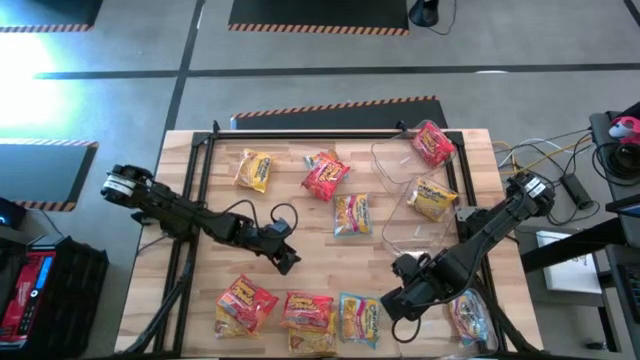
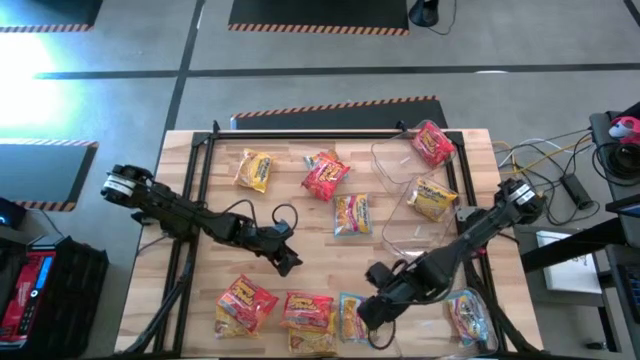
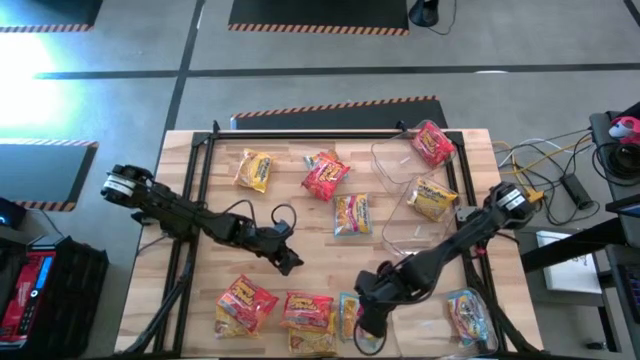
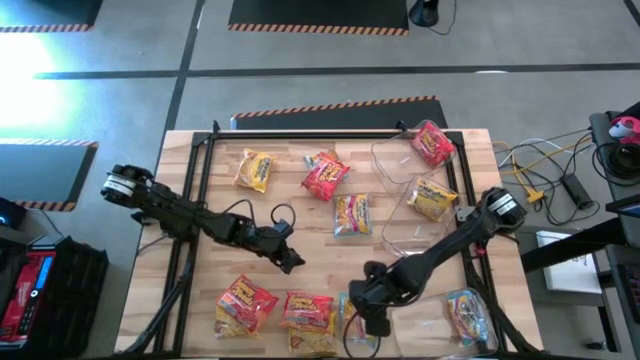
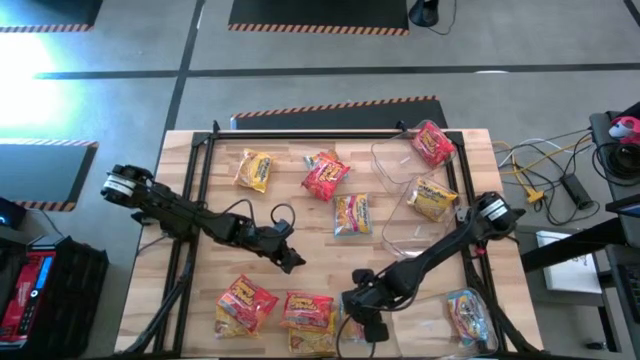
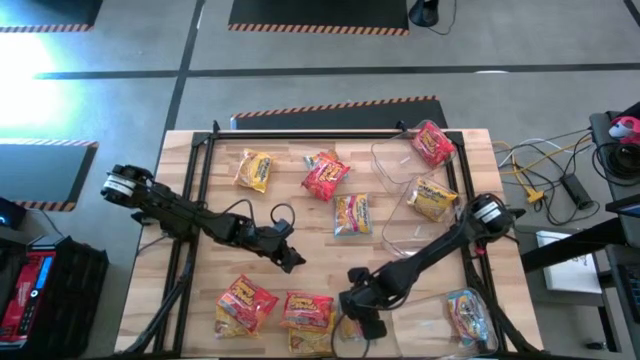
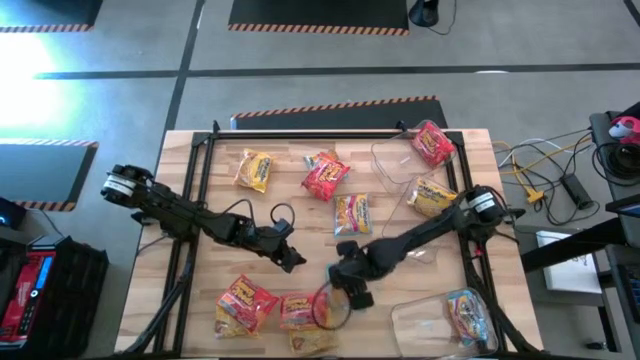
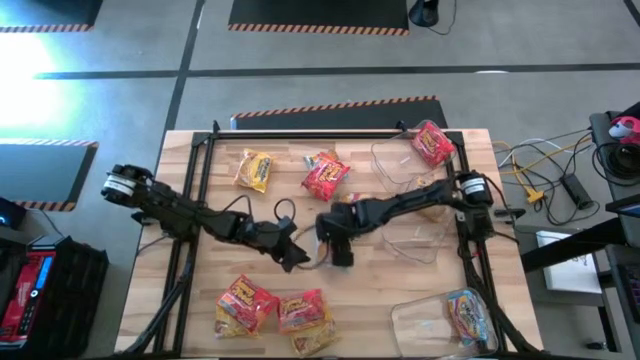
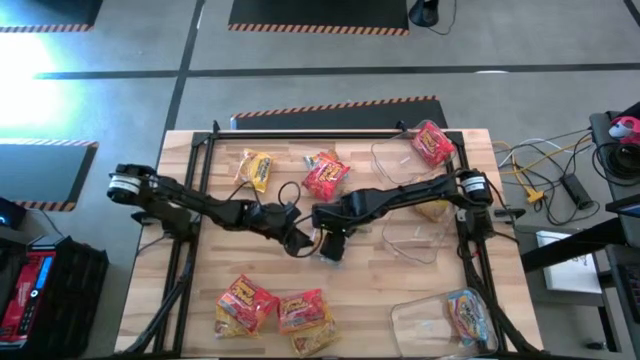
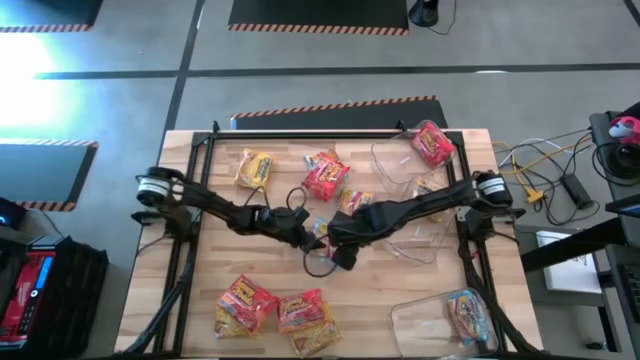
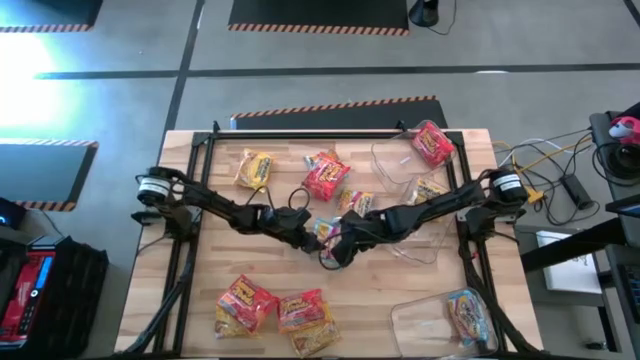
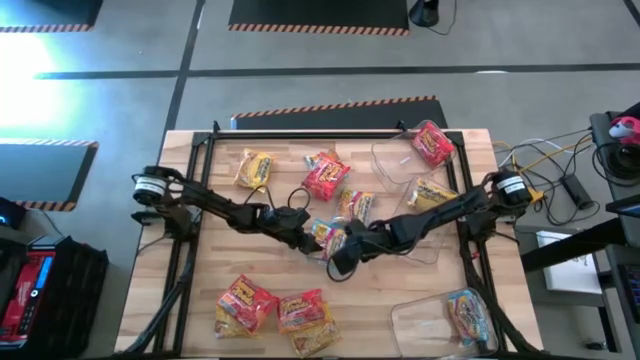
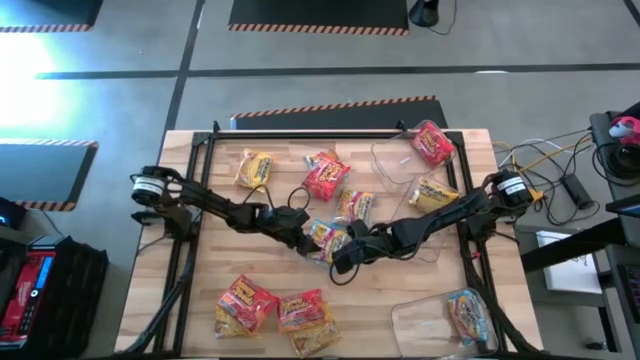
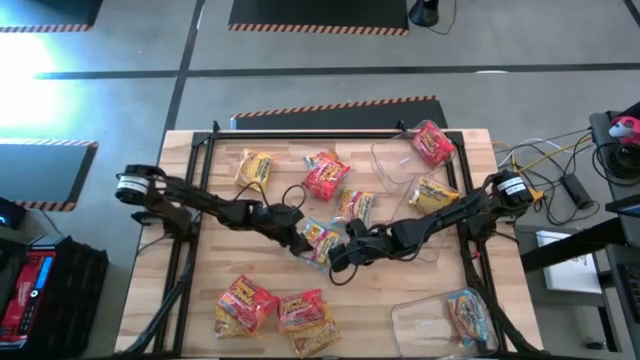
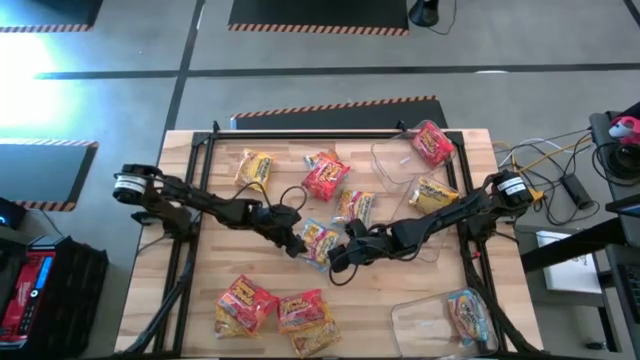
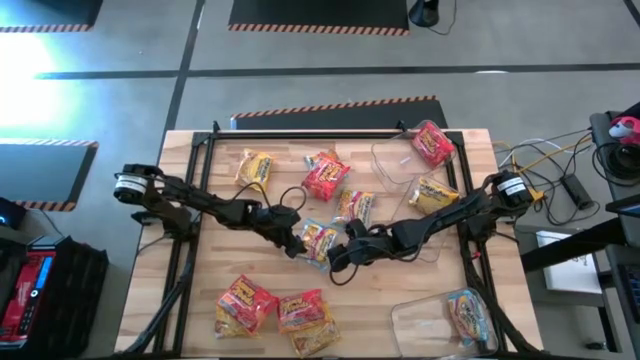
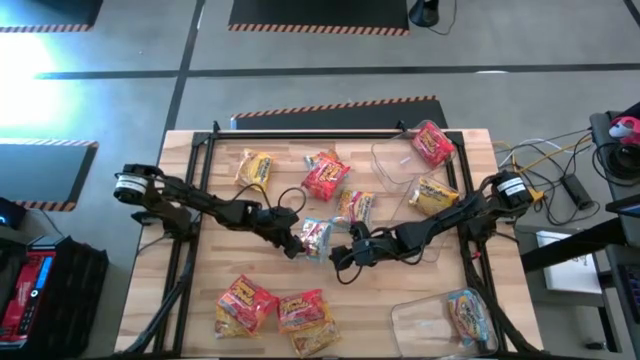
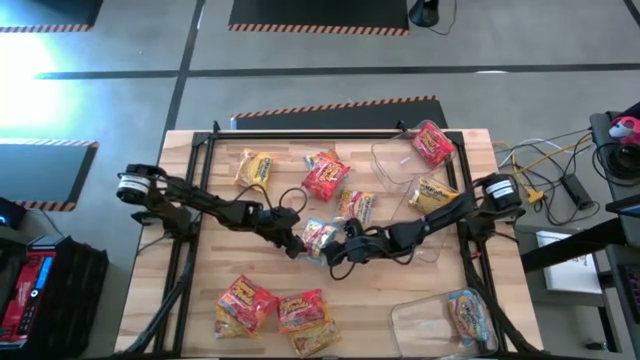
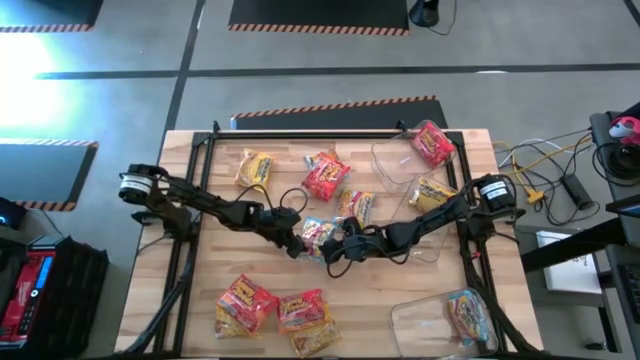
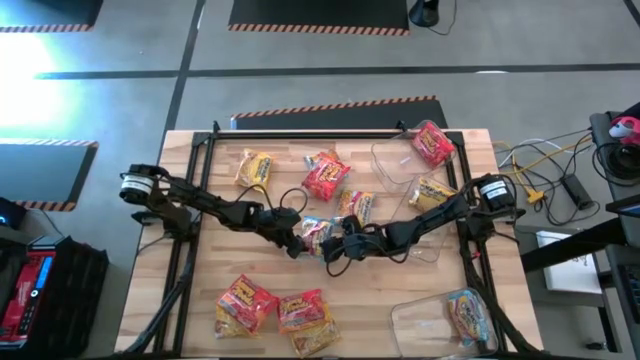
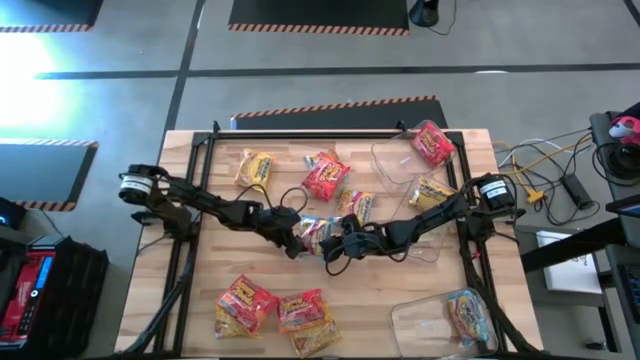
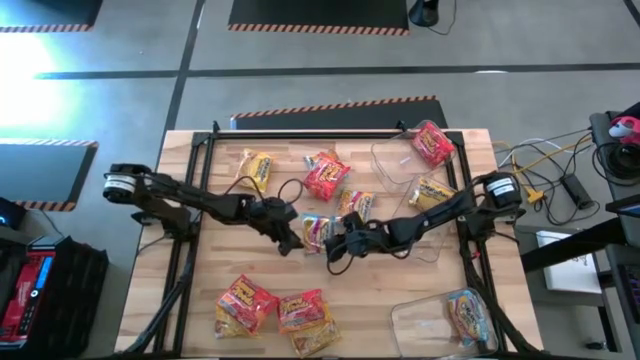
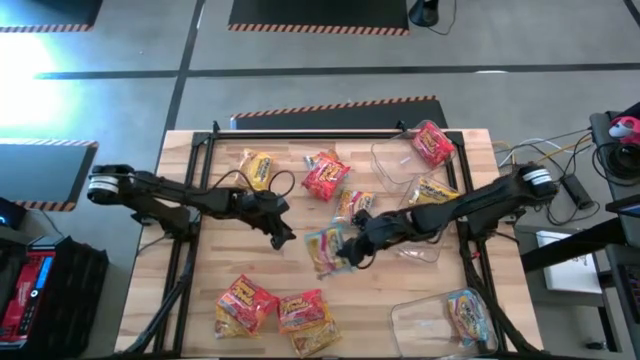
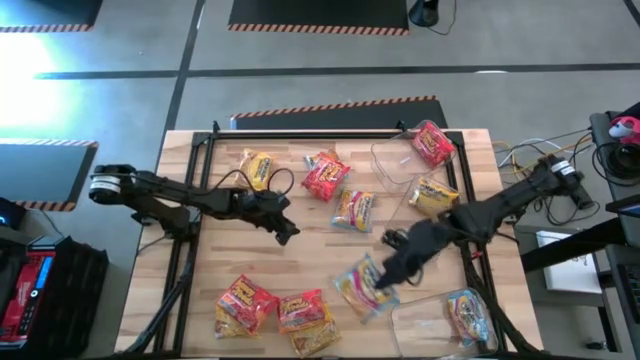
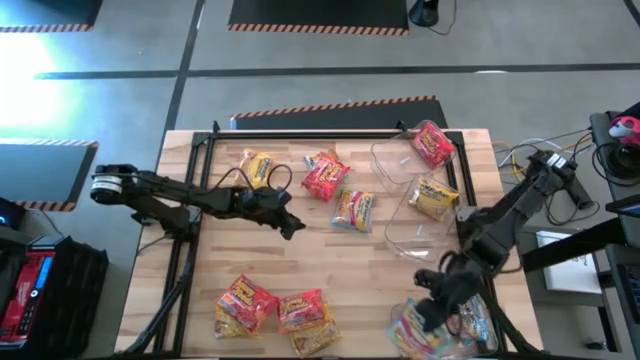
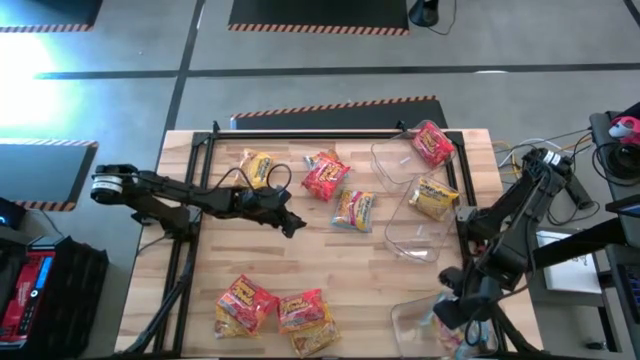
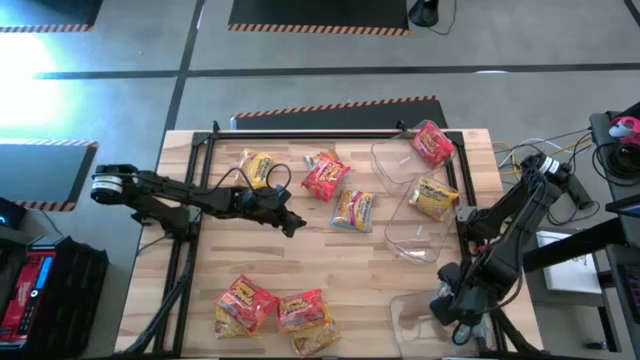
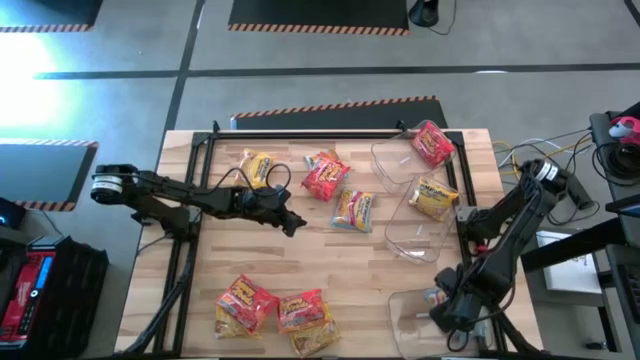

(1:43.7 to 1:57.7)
Task: Sort Maruchan noodles
Put the blue noodle pack into the bottom transparent bin

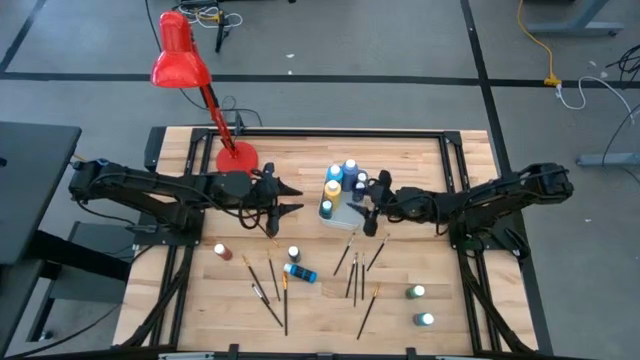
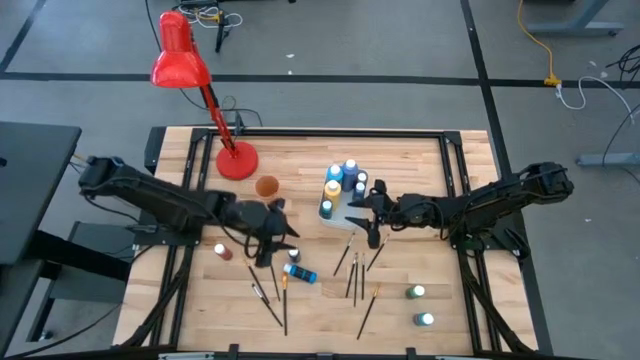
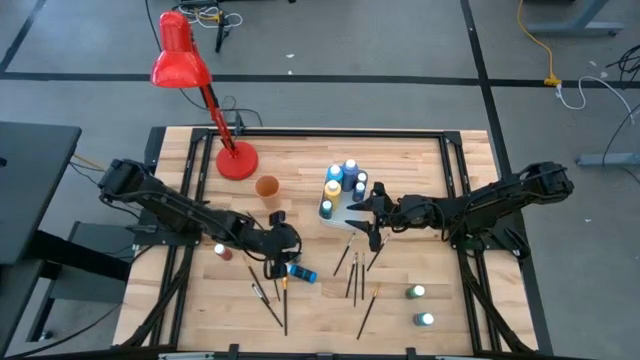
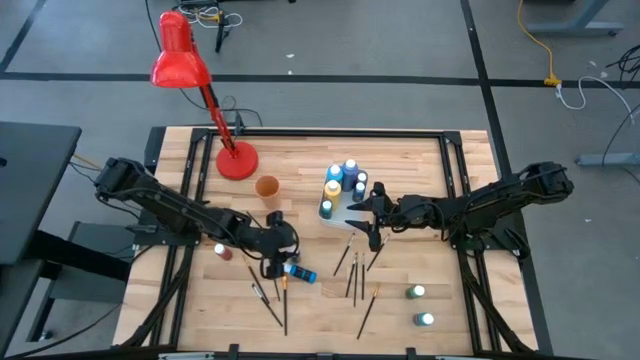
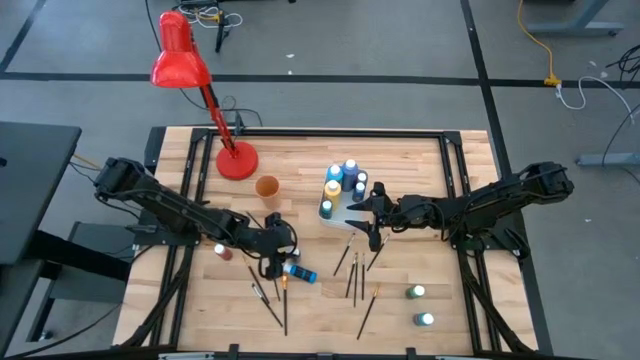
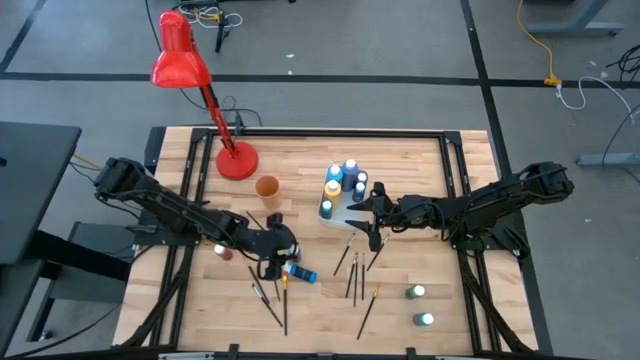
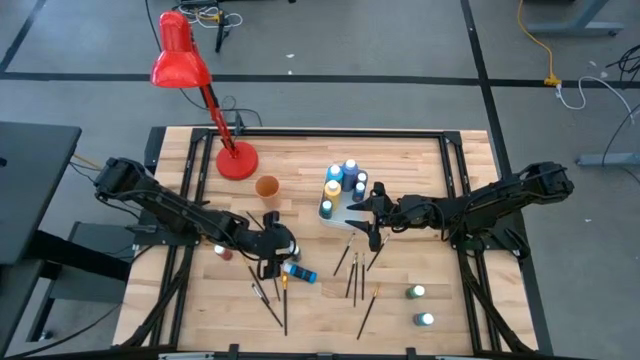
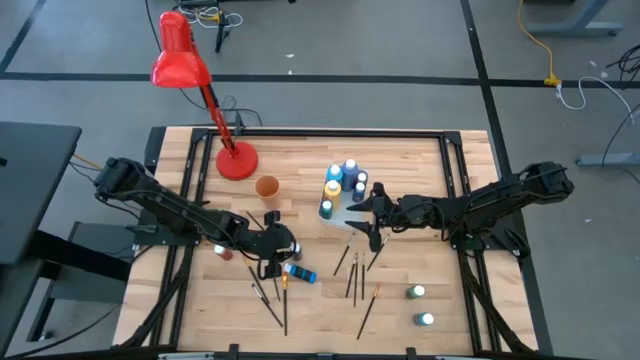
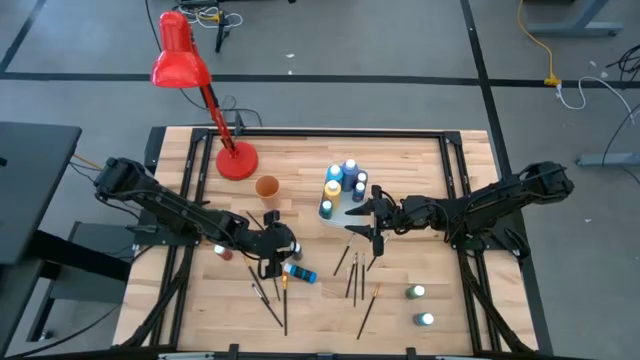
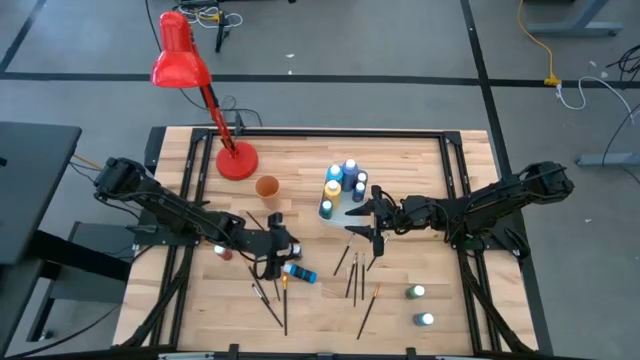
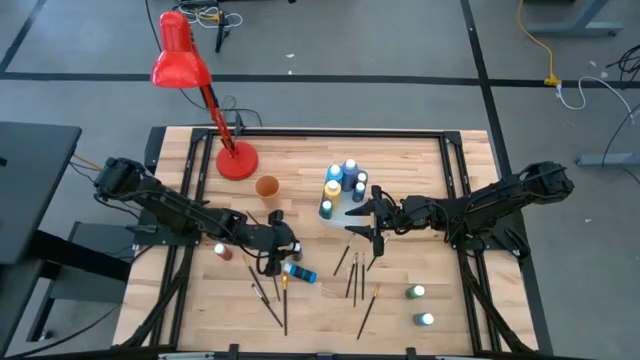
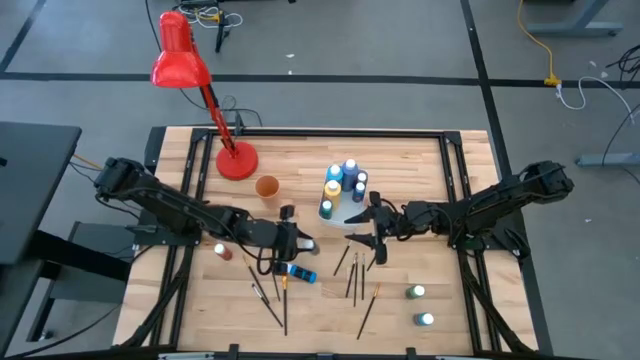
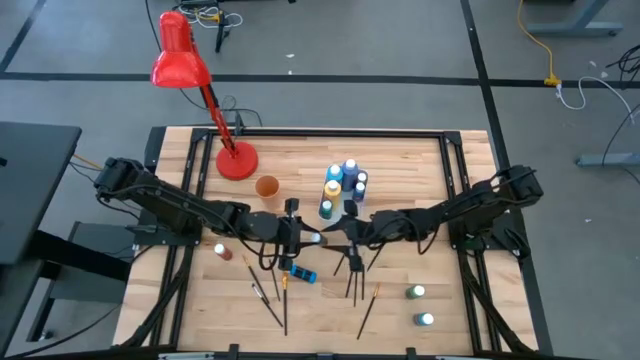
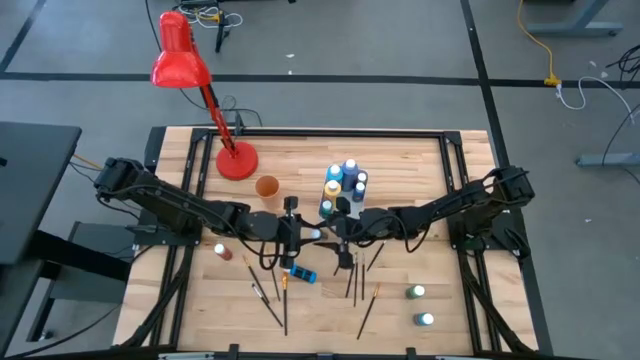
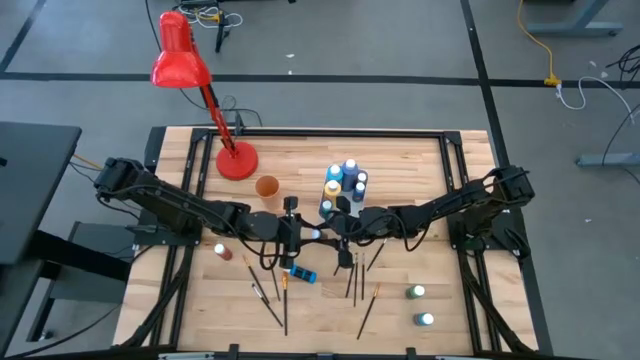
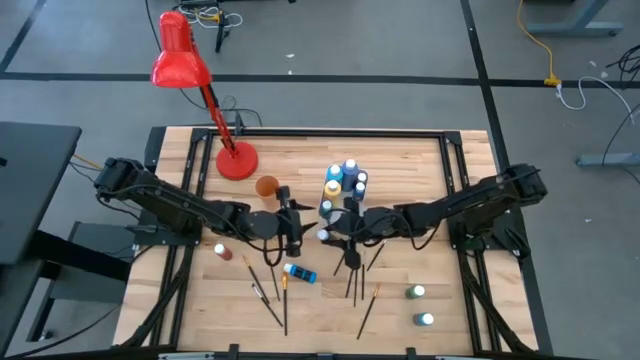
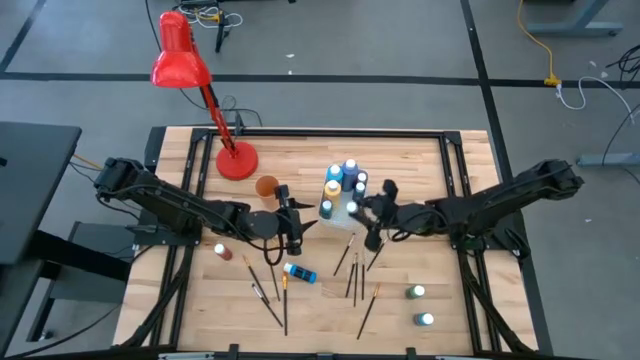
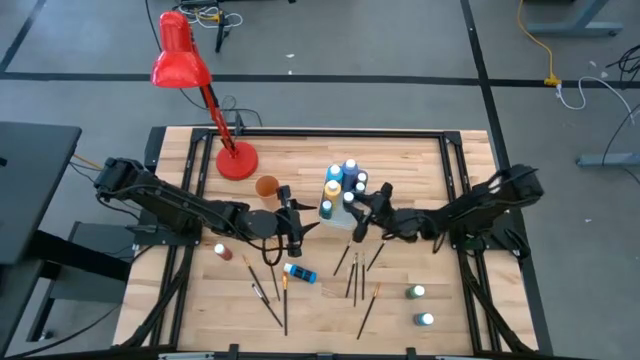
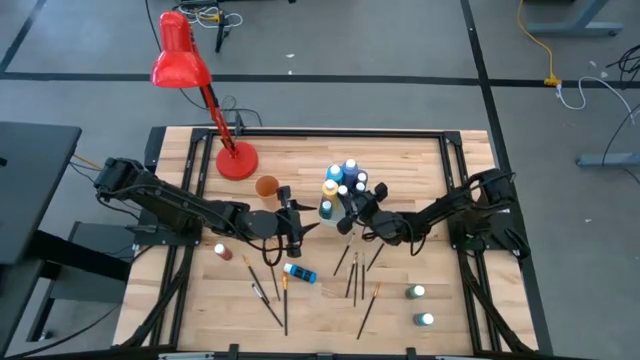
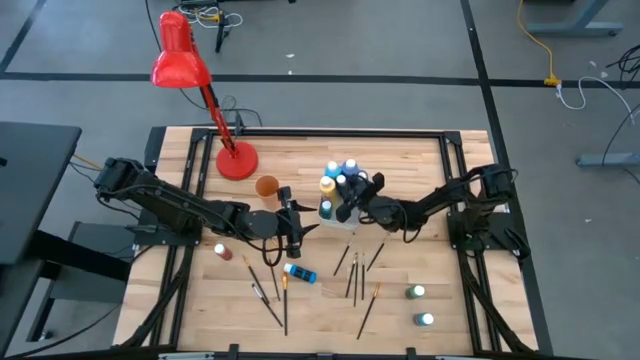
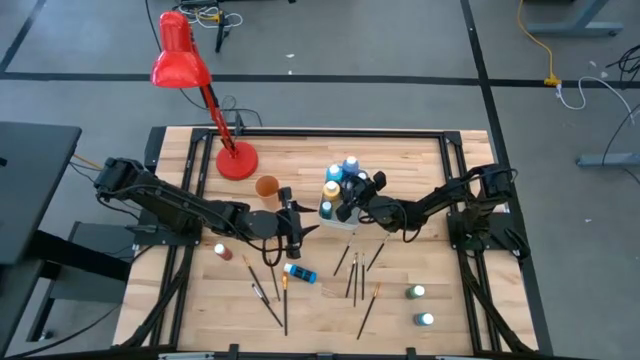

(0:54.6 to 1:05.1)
Task: Pick & Place Paint Supplies
Put the small black paint bottle into the white bin
